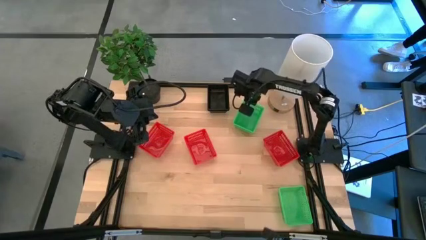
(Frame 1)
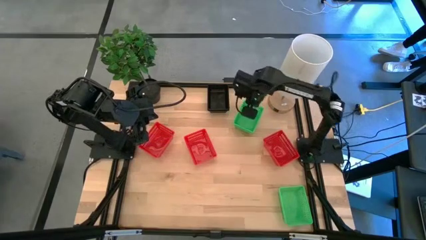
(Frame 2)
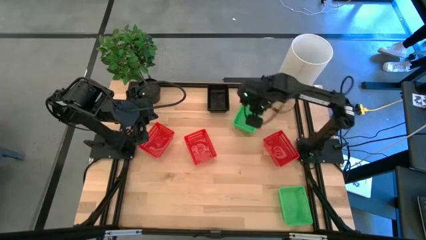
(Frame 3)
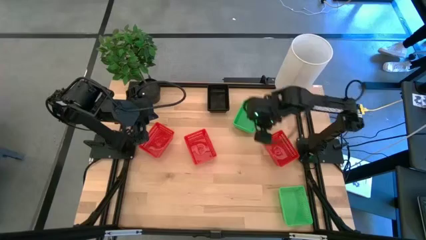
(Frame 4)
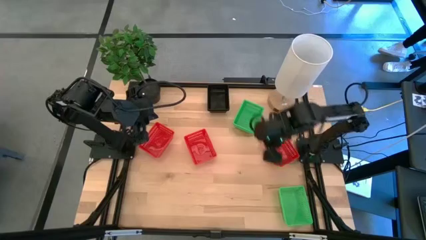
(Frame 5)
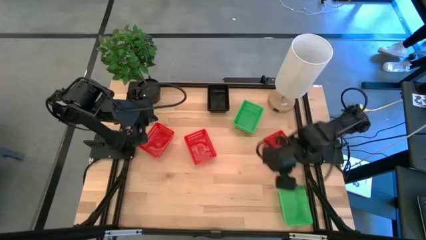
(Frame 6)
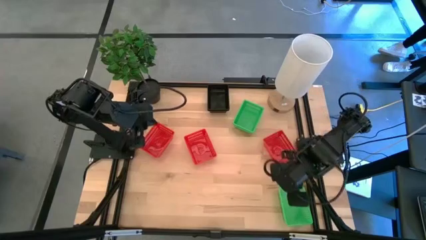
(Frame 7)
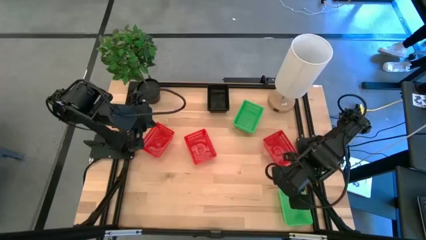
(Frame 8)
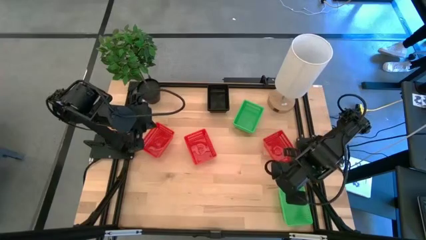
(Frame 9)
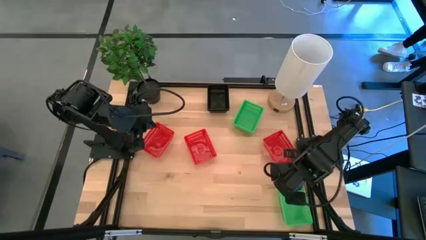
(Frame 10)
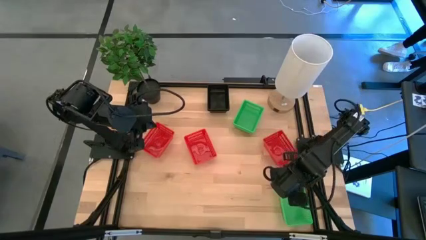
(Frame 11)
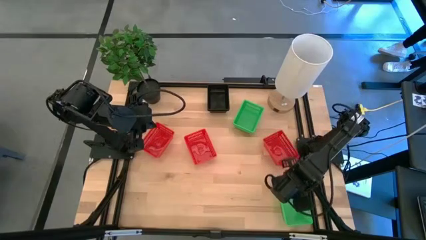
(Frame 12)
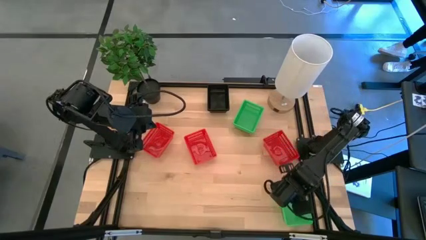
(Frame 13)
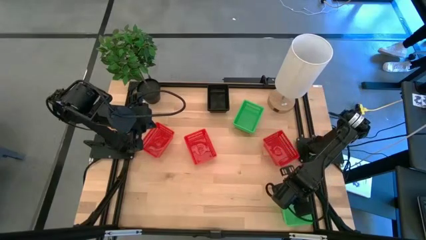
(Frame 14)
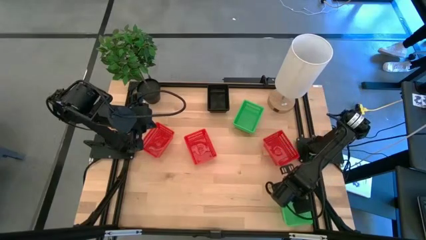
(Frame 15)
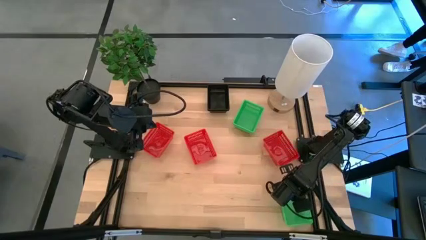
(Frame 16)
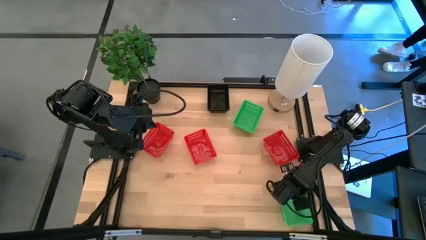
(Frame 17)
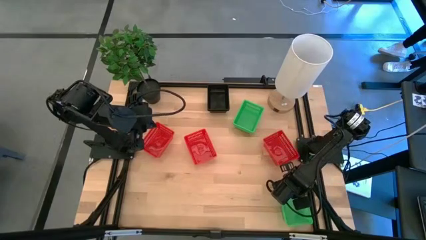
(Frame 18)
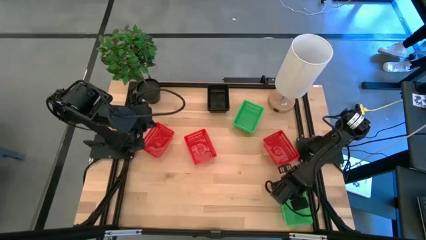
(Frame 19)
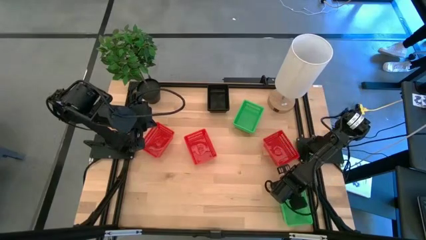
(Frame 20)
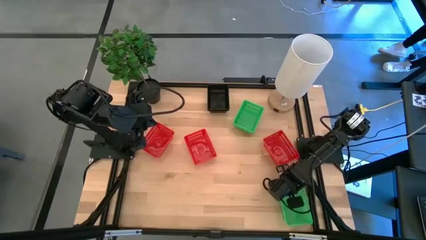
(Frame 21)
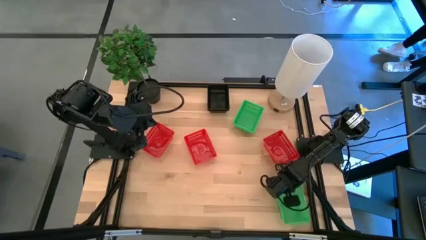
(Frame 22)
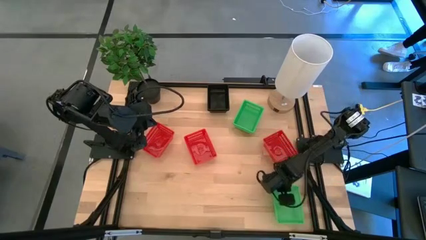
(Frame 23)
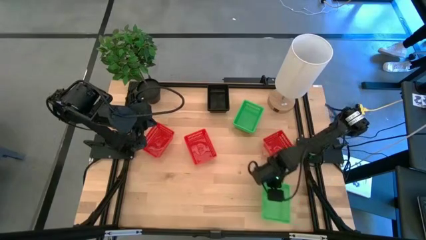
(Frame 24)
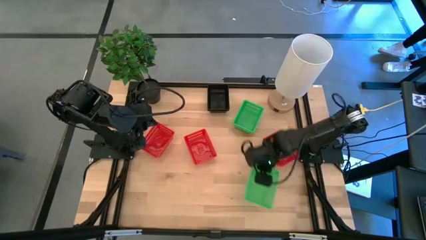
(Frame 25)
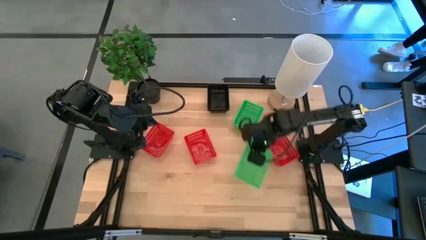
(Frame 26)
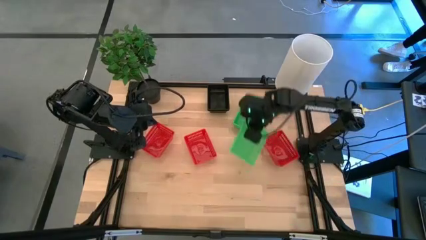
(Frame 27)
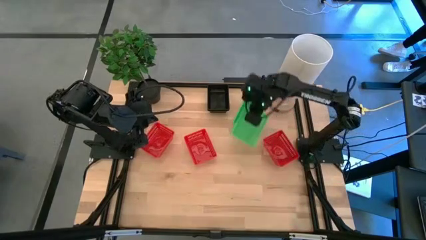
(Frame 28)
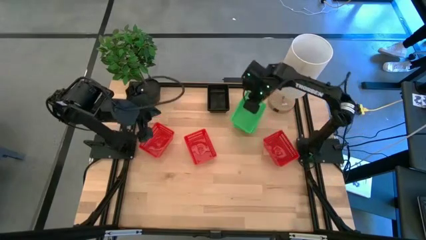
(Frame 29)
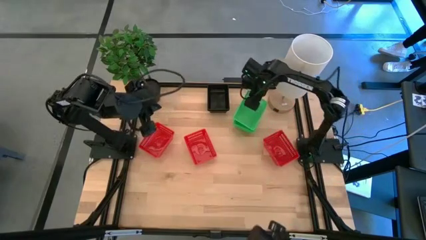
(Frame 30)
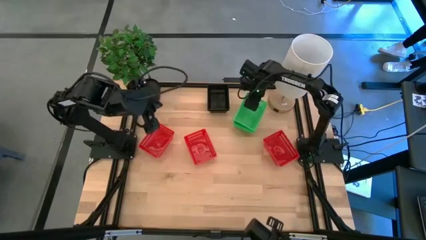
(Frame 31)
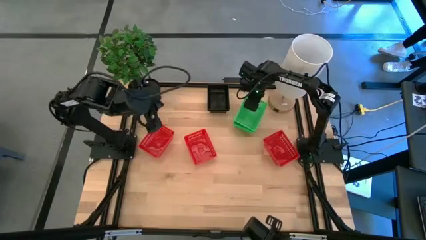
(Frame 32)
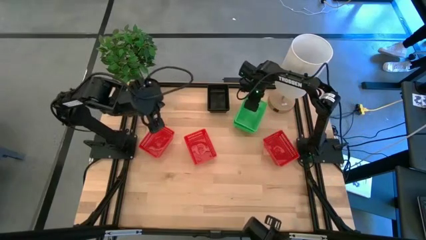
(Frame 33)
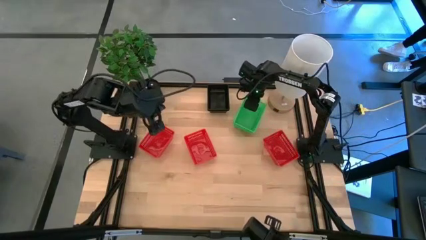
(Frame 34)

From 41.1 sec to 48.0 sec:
Stack the bottom green bin on the top green bins

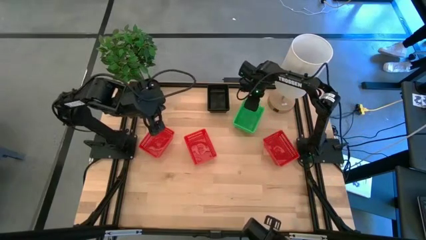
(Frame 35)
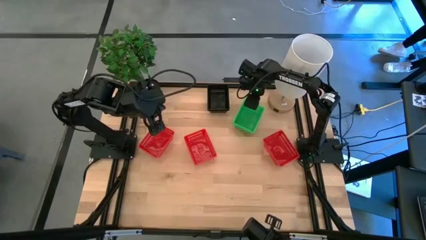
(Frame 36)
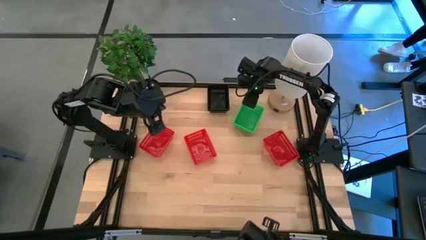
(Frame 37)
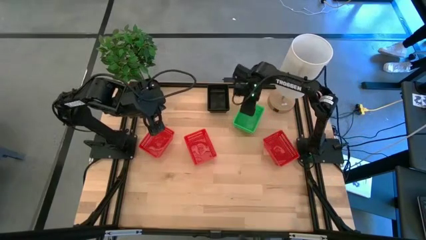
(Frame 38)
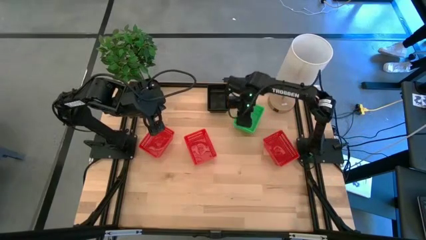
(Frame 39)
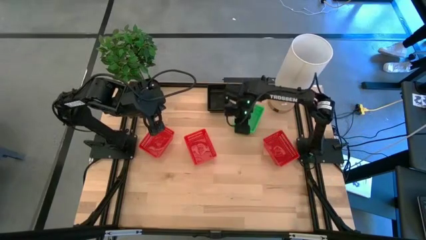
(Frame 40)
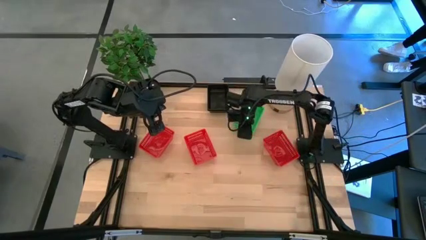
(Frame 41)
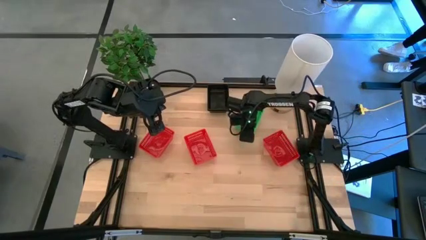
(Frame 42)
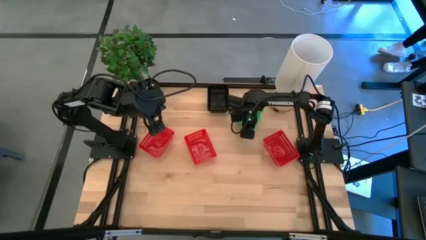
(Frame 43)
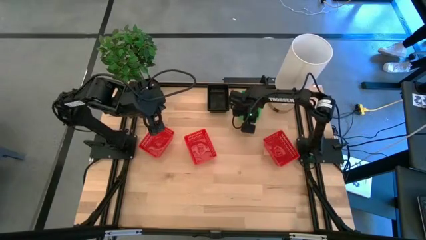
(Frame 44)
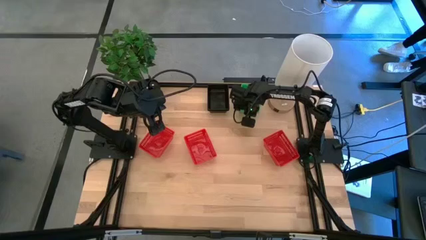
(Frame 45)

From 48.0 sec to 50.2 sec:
Move the stacked green bins to the right of the stacked black bins

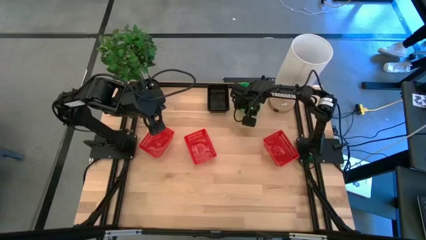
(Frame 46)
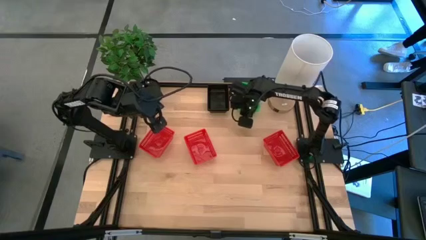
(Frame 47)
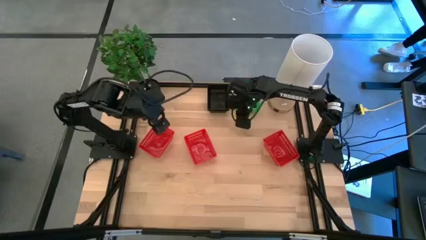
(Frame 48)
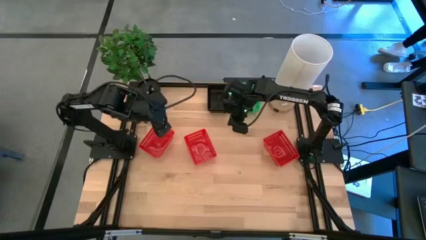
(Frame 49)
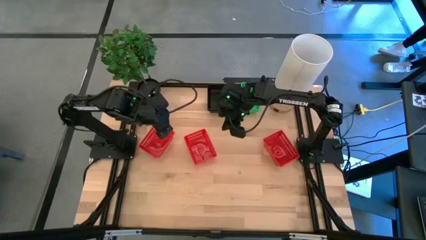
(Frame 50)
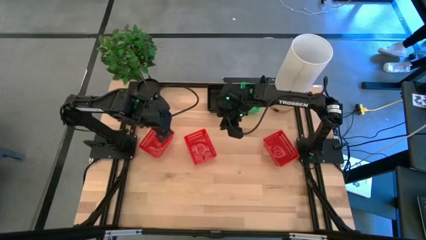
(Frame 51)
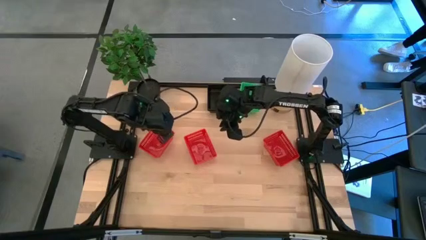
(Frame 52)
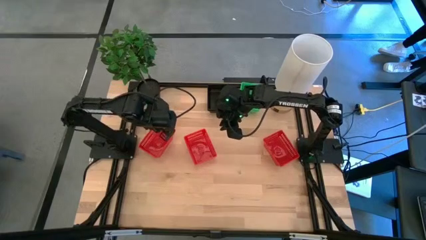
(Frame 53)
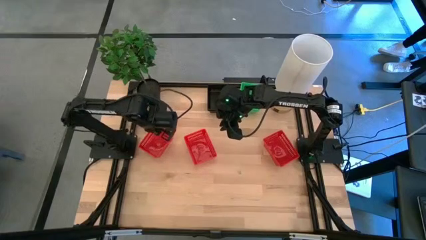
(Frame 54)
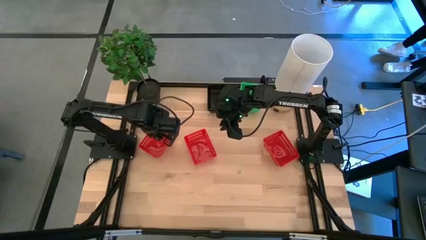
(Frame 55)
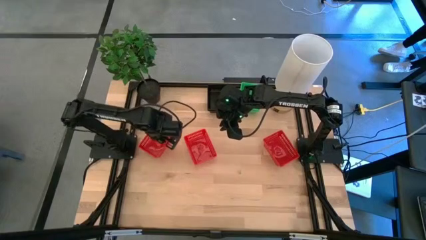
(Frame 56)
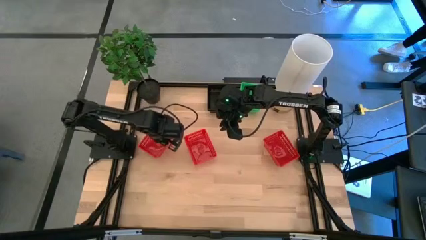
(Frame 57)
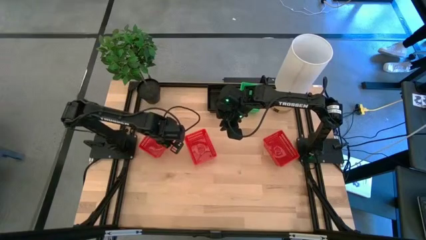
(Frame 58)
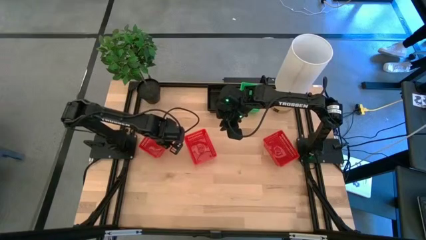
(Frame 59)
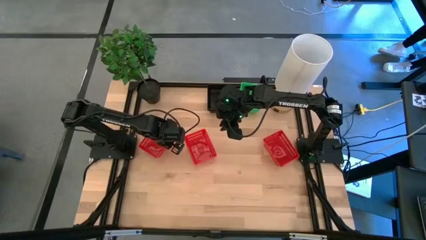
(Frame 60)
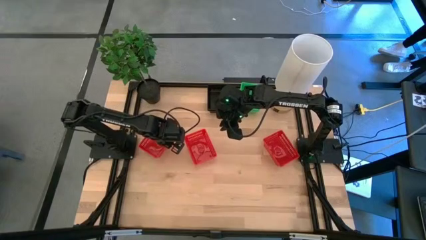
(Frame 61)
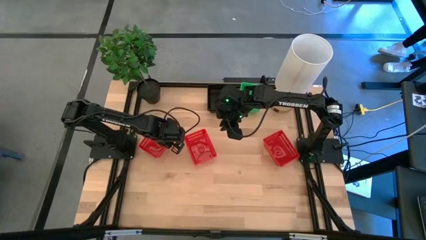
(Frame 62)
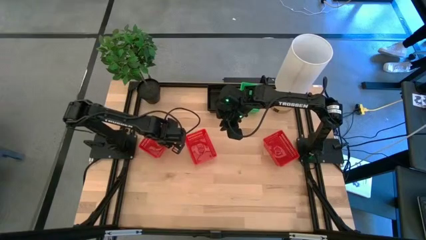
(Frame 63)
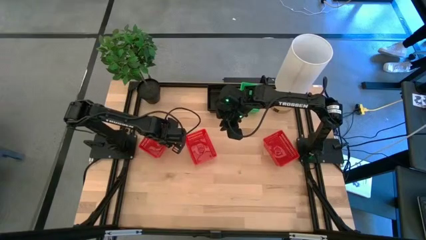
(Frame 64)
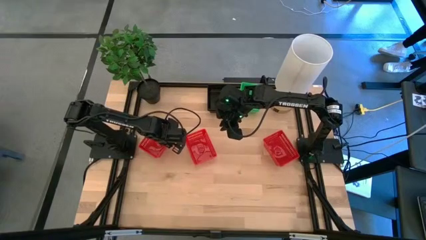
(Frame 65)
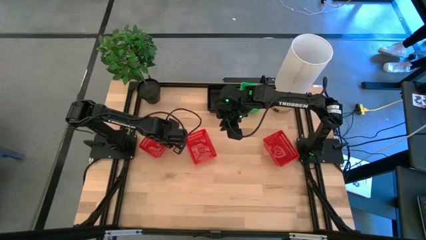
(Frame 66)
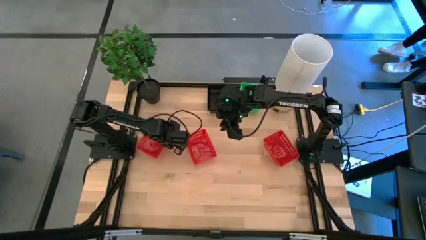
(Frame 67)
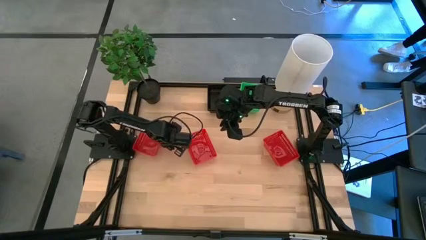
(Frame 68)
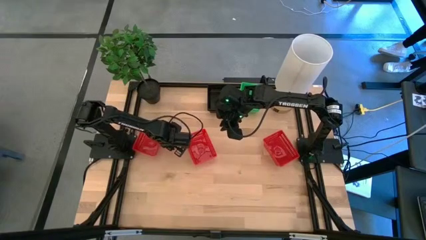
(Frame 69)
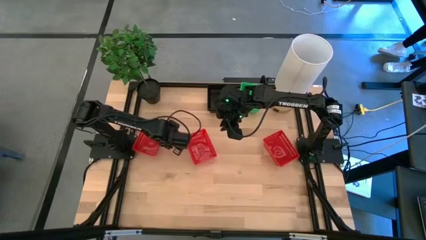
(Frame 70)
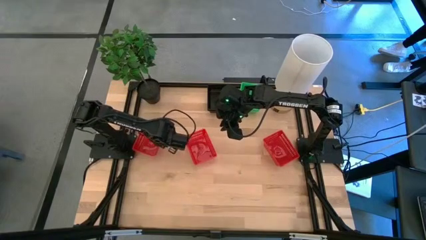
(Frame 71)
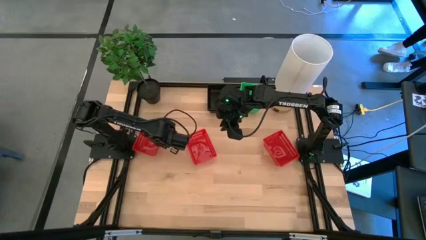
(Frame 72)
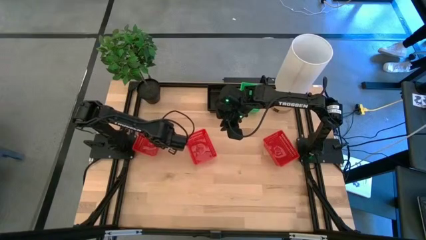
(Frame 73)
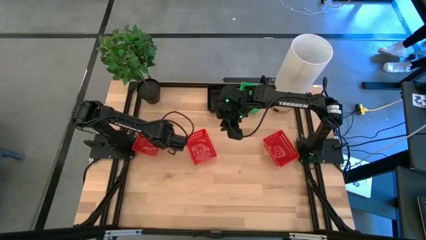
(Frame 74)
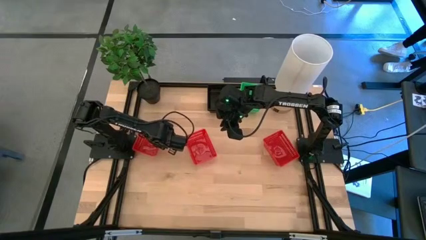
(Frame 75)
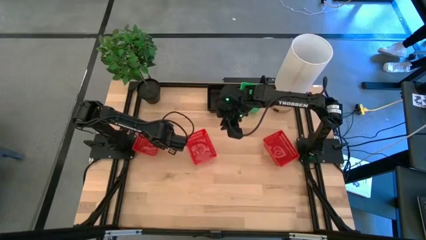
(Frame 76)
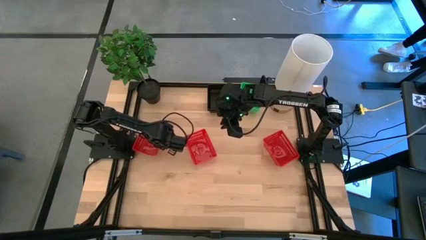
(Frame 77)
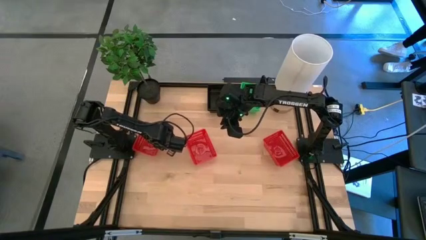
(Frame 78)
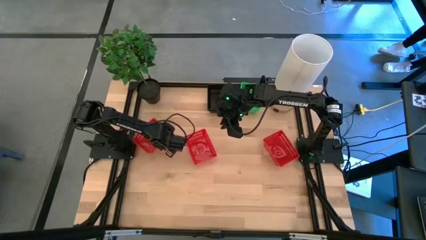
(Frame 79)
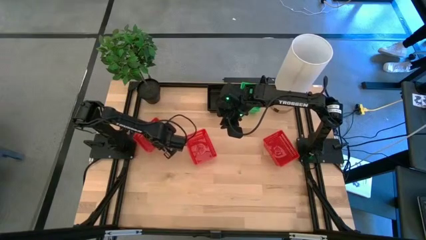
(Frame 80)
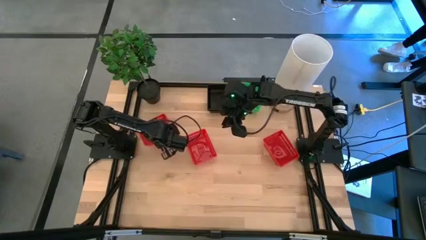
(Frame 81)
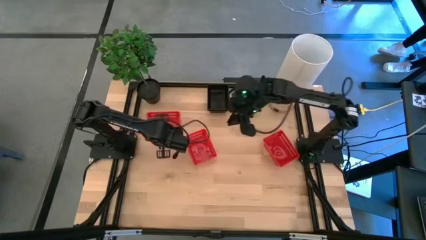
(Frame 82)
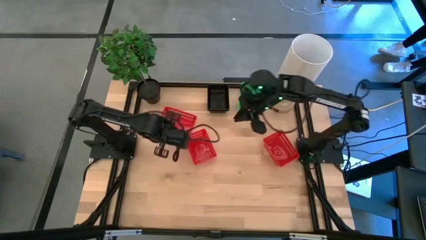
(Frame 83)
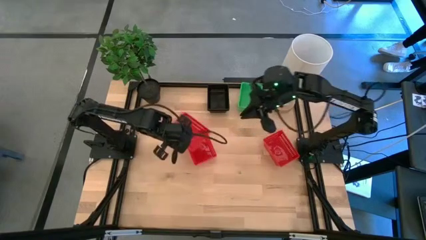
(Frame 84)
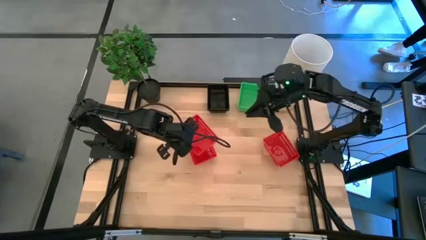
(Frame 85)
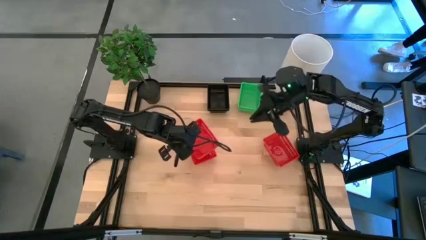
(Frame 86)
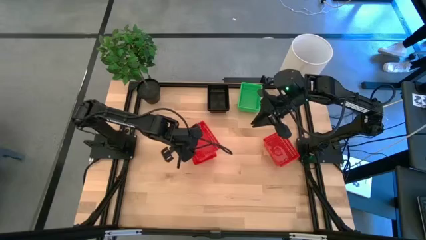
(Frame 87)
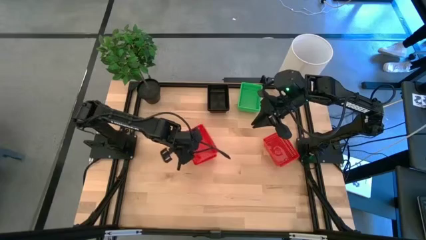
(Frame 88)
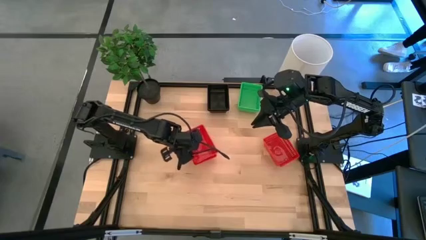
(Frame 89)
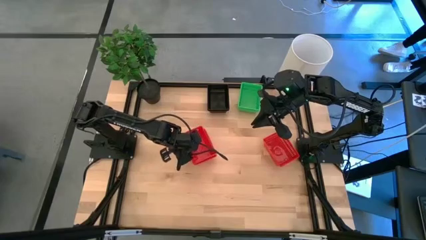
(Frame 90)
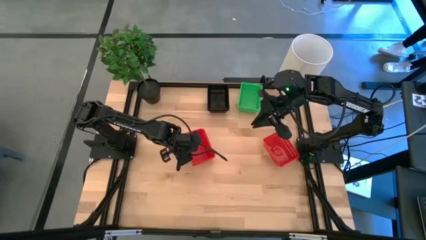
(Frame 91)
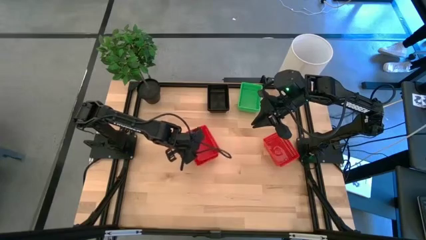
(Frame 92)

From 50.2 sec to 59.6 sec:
Stack the left red bin on the middle red bin
